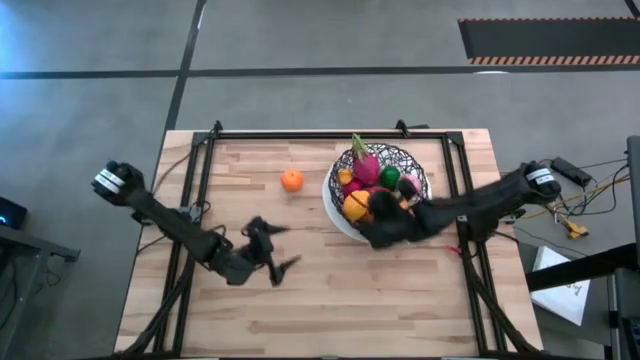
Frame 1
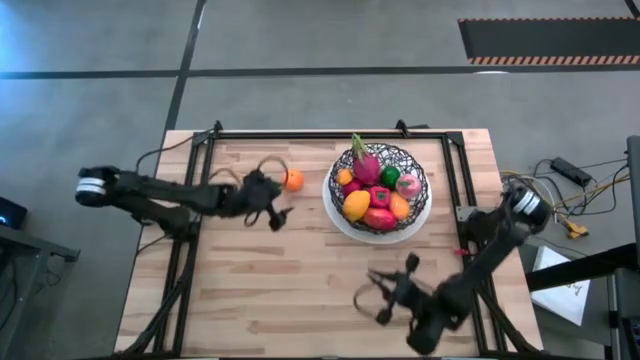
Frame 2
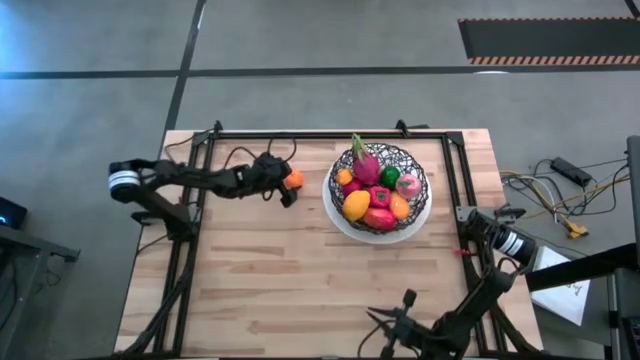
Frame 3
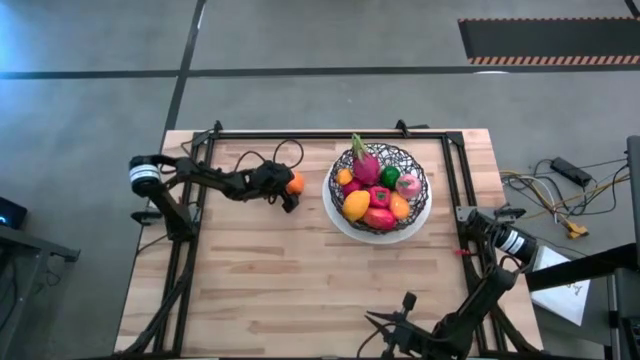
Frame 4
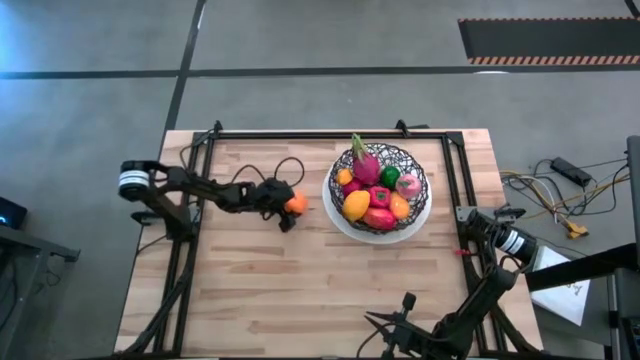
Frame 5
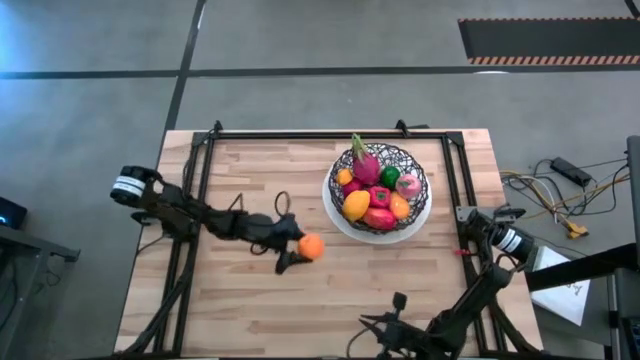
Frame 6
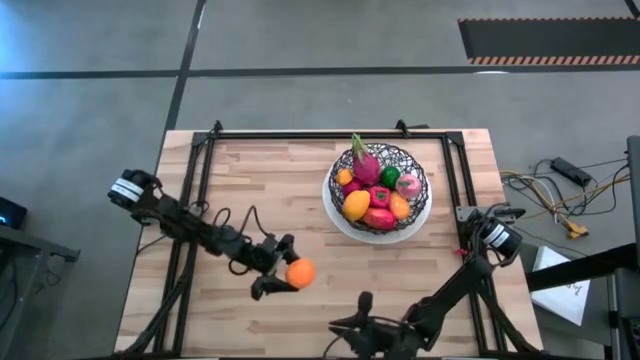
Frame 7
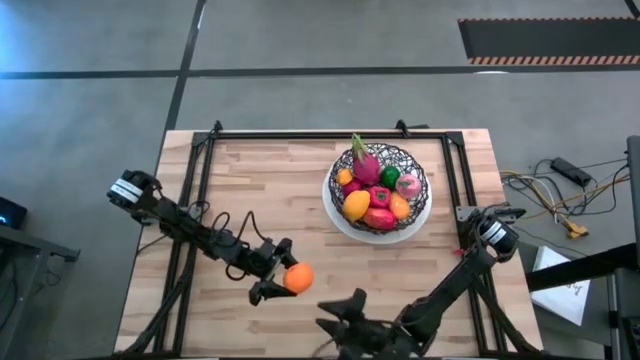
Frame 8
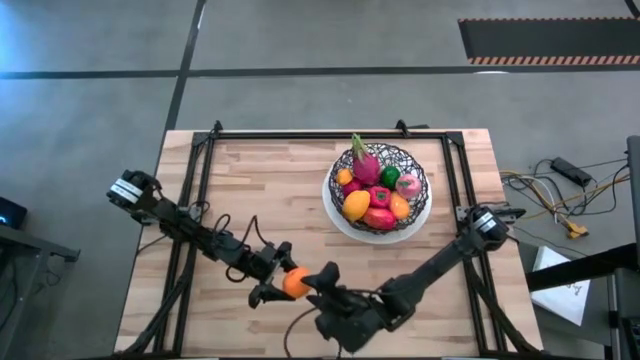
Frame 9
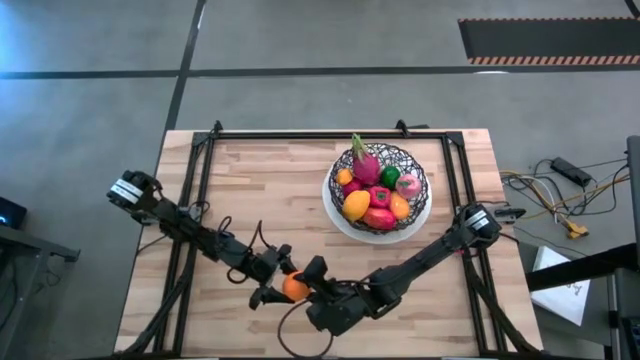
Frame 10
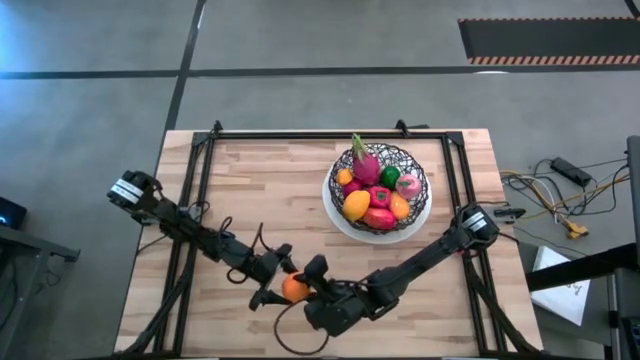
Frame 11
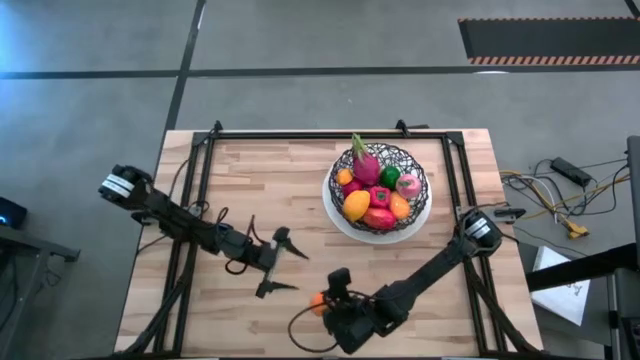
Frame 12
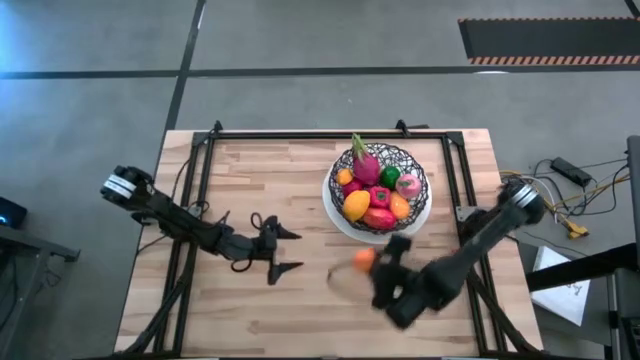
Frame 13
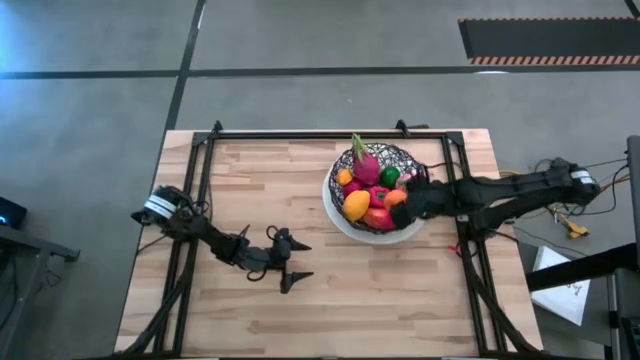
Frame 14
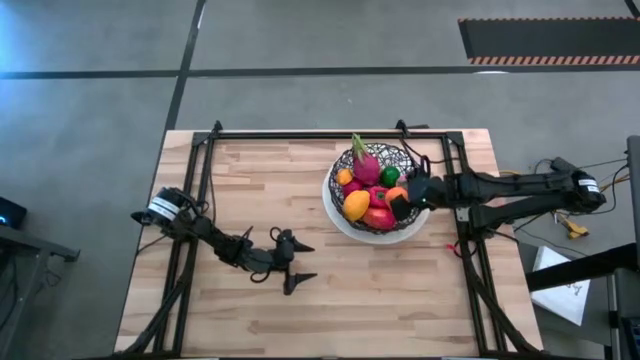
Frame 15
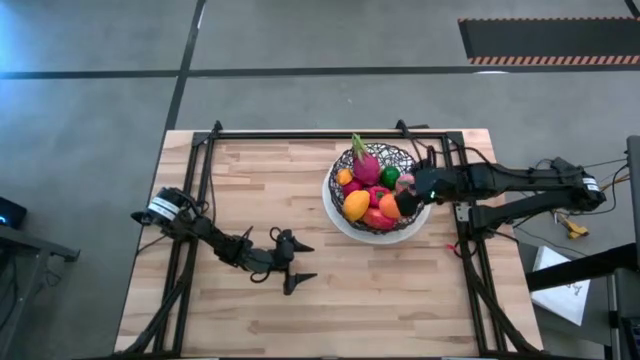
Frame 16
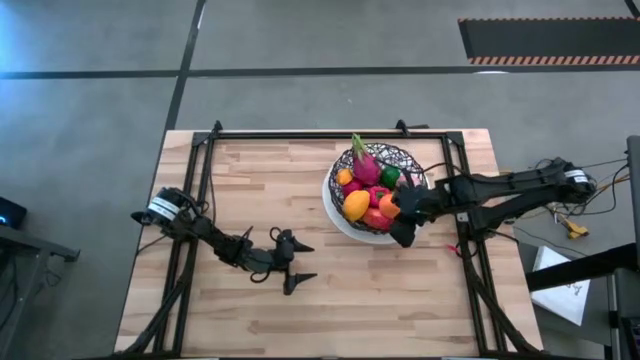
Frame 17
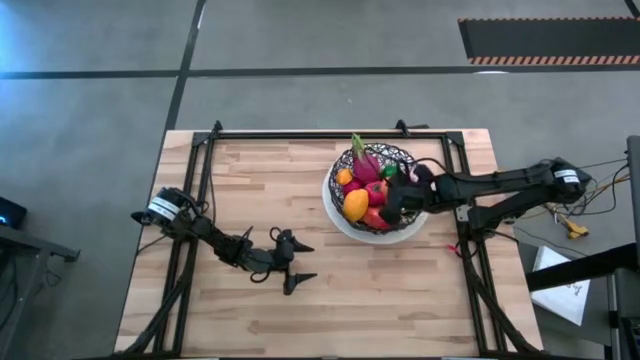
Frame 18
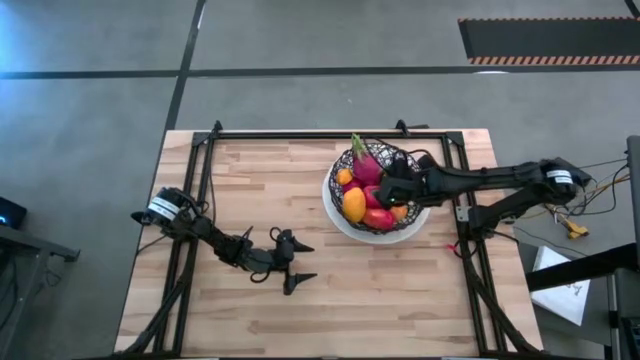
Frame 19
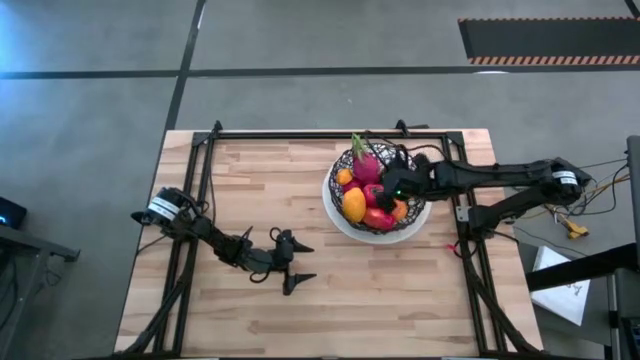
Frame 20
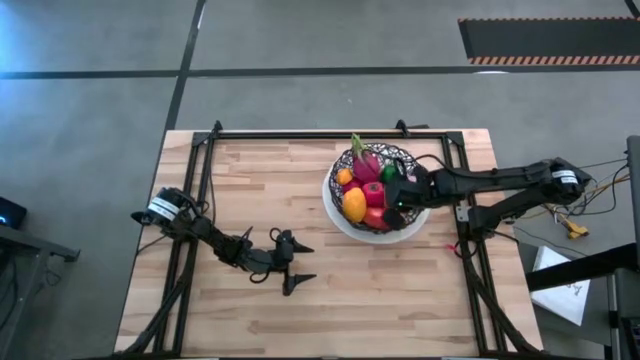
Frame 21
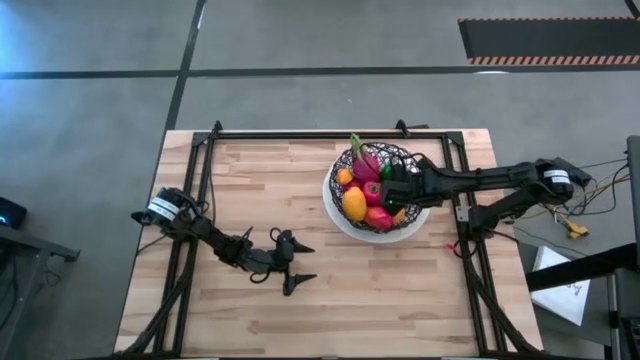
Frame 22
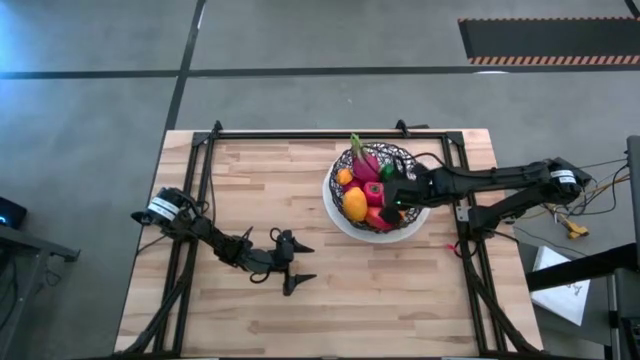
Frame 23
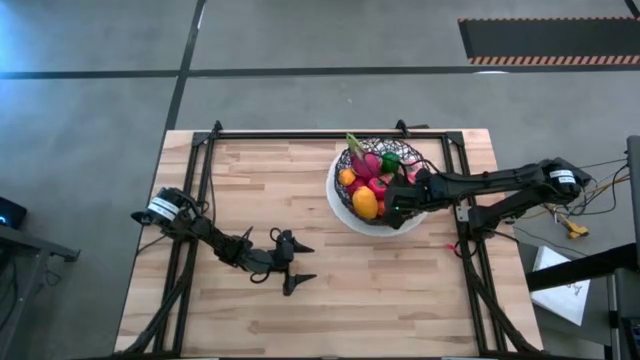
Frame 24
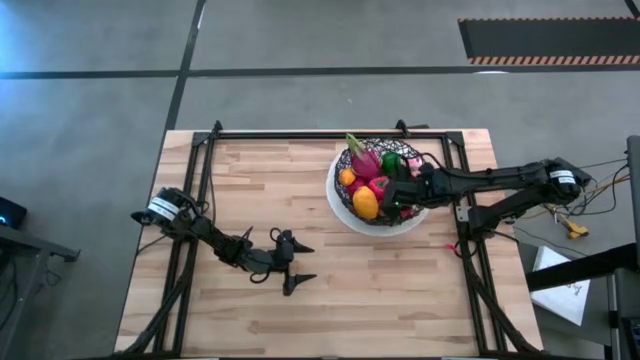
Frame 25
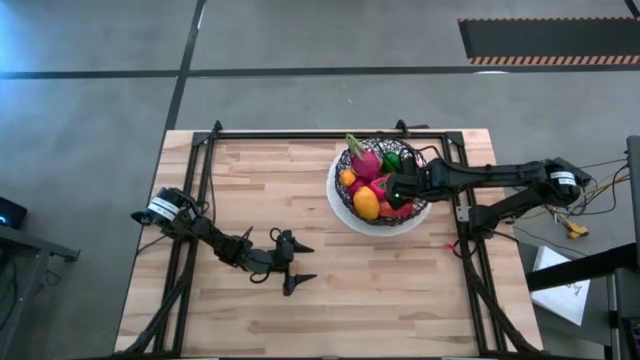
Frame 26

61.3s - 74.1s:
Task: Build produce basket
Put the orange into the black basket

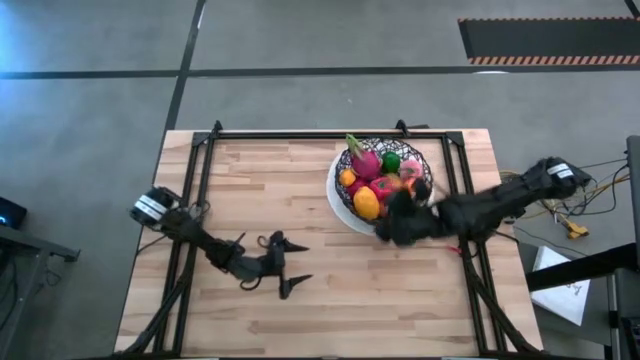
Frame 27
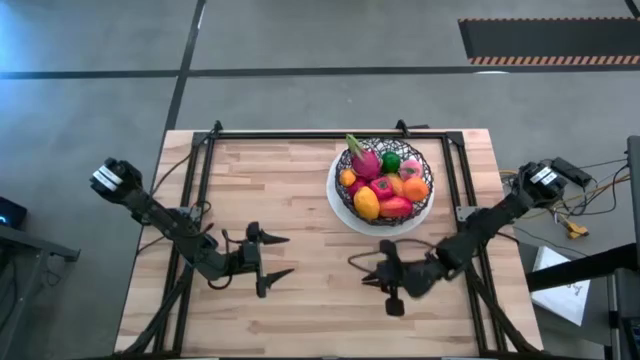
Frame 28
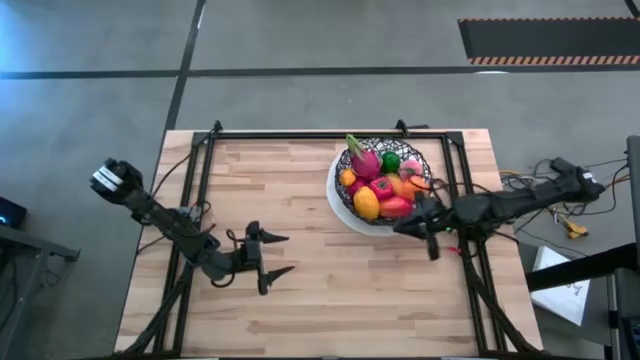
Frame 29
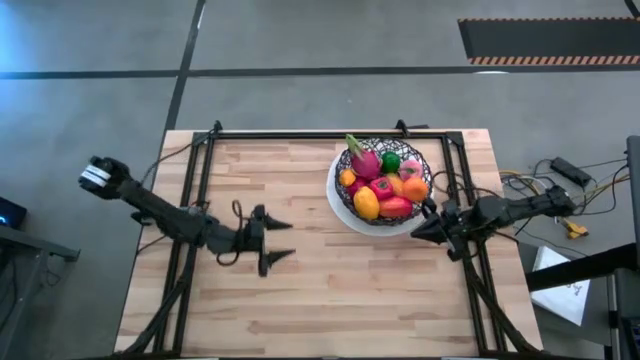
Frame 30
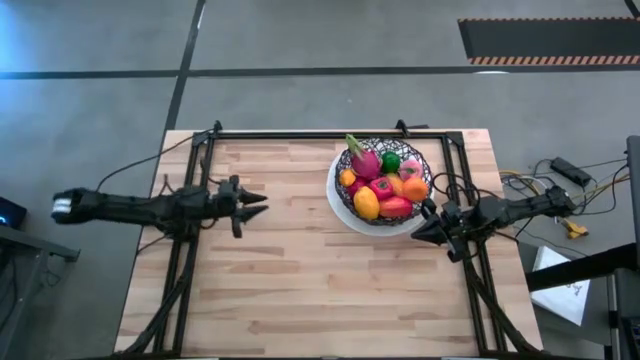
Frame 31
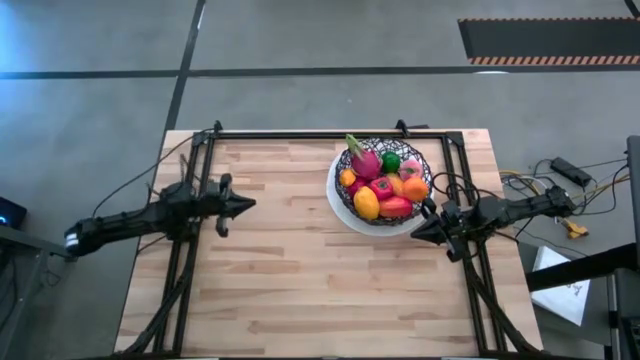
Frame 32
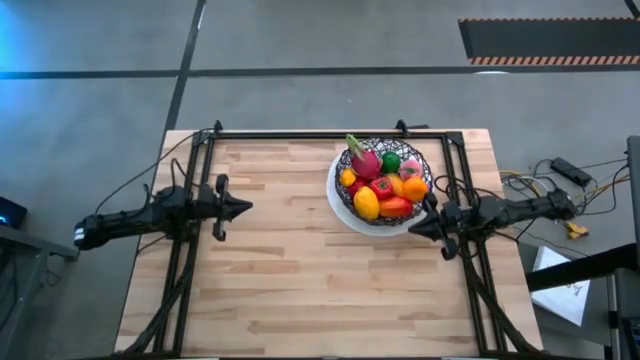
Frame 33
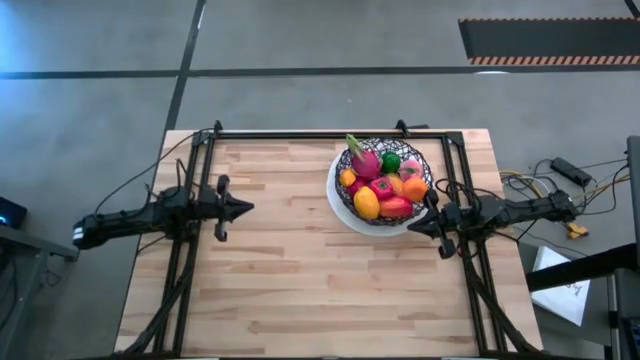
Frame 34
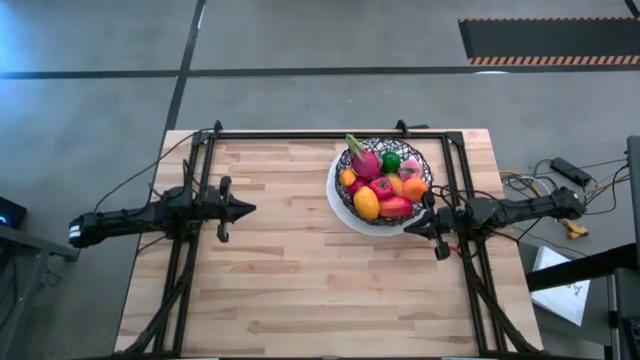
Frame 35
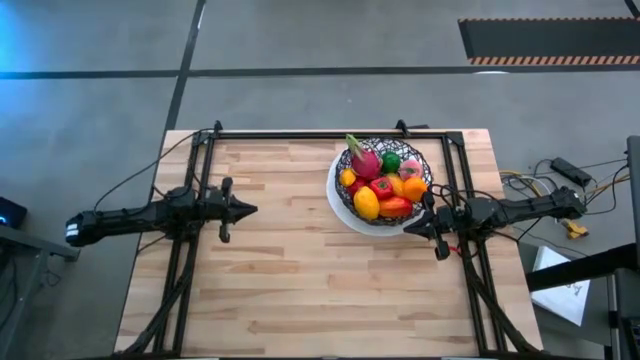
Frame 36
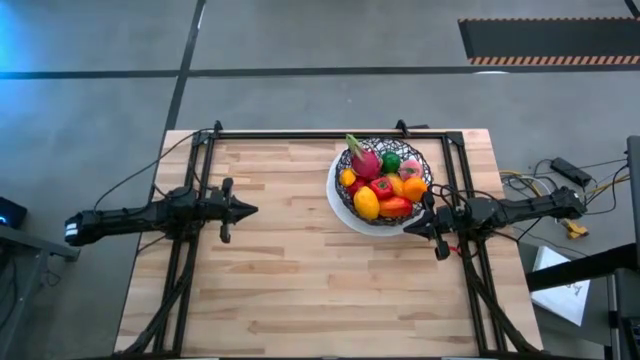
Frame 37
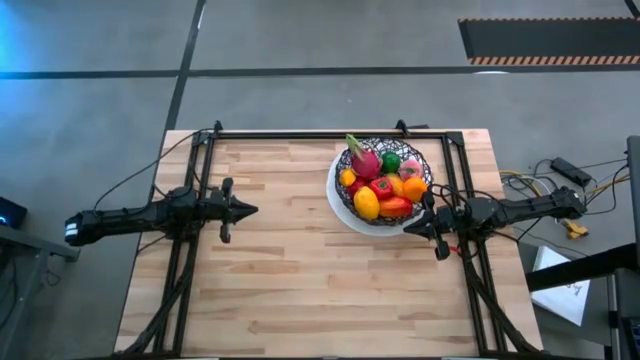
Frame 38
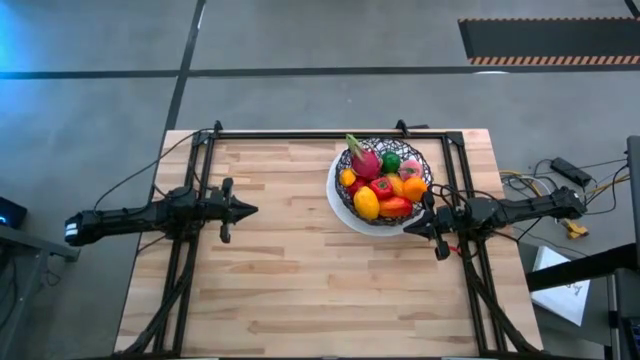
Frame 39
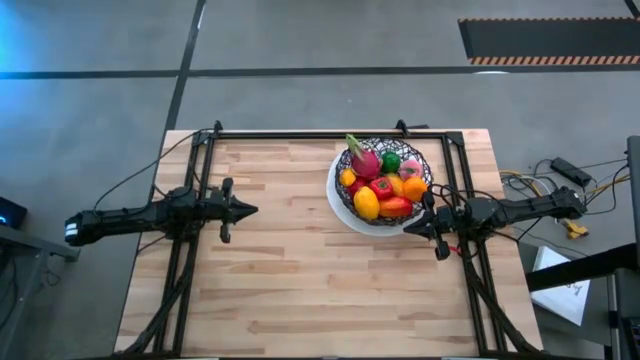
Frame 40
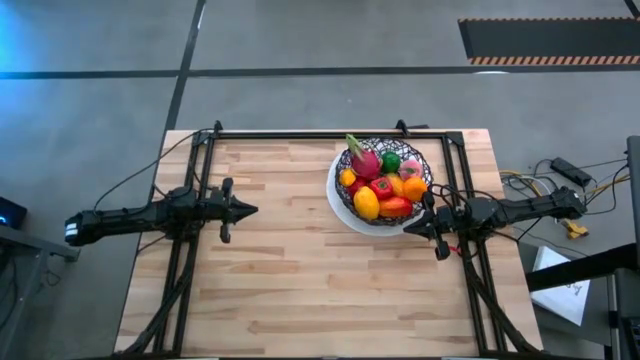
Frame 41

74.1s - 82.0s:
Return to Home Position
